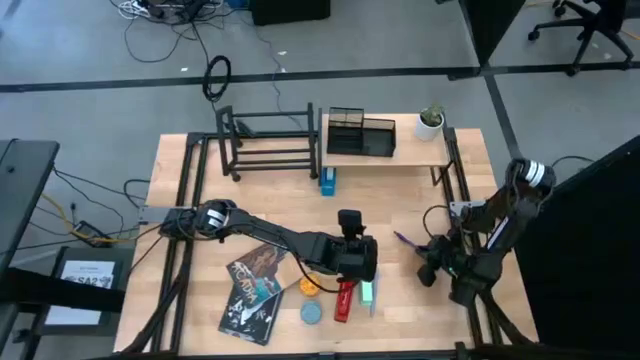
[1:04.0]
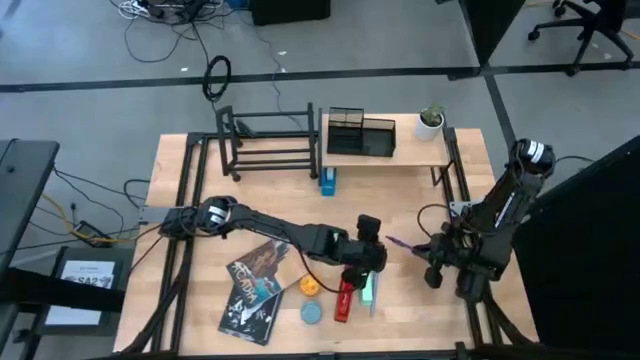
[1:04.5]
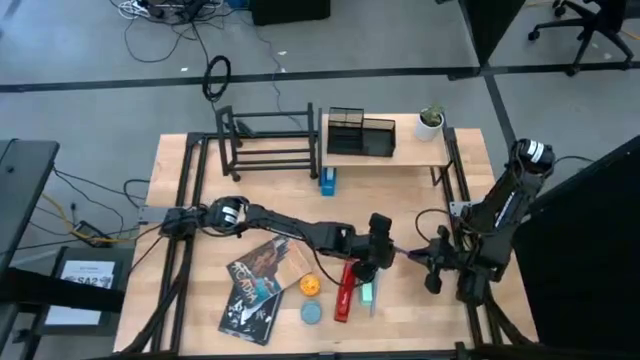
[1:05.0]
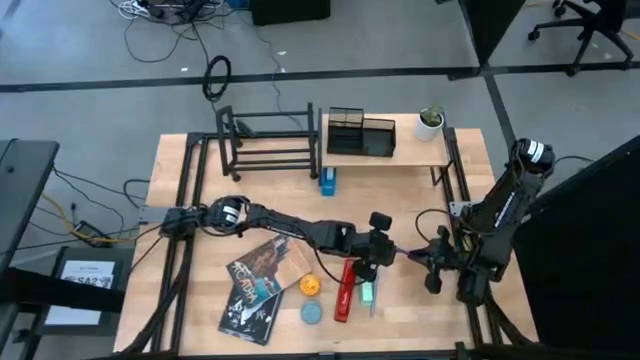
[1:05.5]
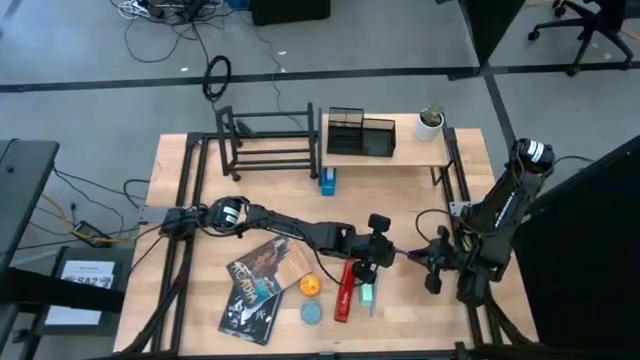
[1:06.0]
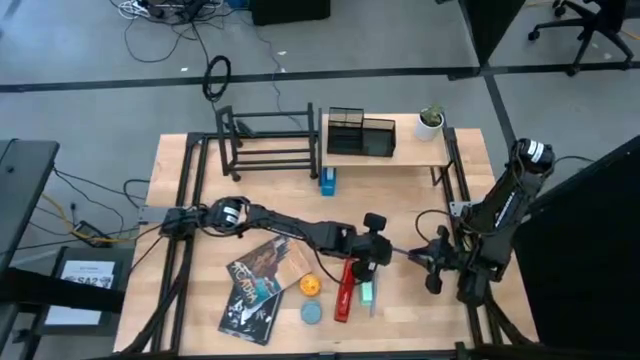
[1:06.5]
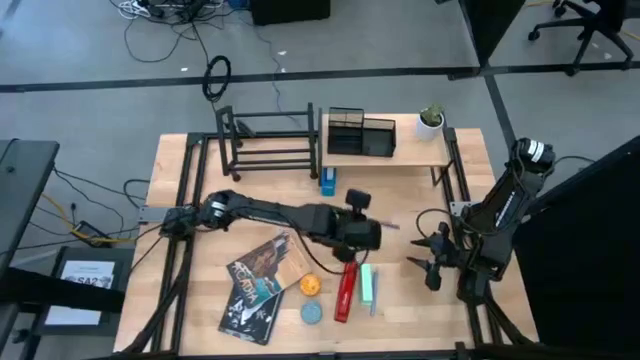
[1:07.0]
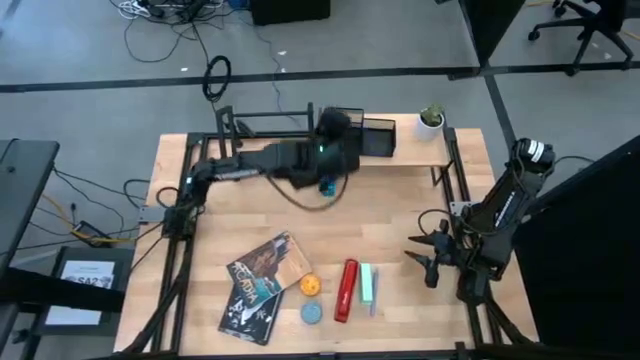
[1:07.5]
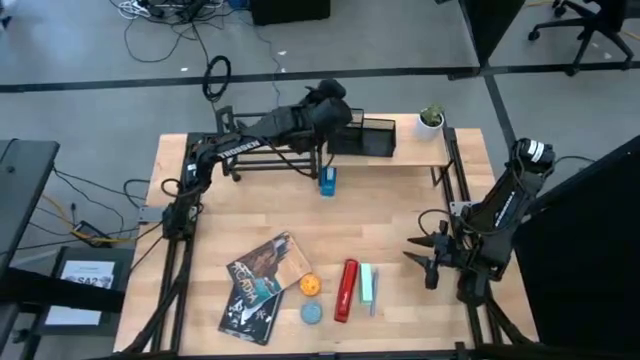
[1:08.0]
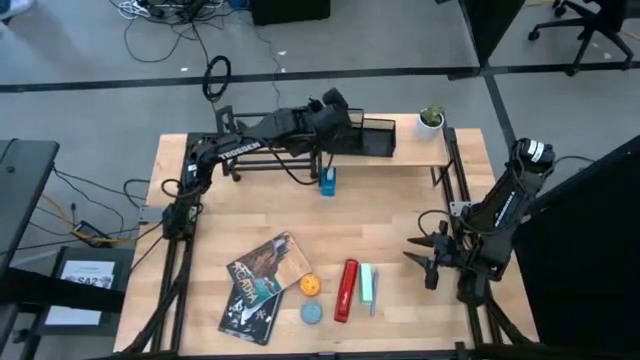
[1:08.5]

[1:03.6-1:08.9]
Task: Stock shelves
Put the blue ballpen on the pen holder

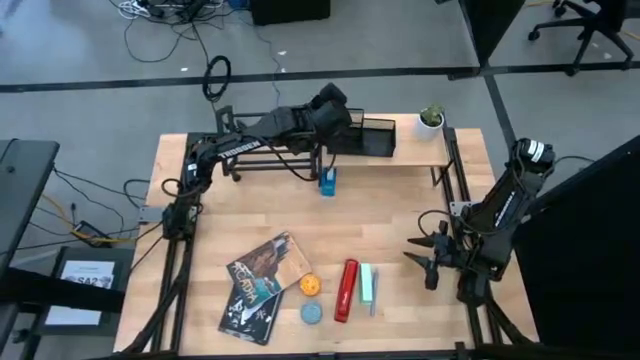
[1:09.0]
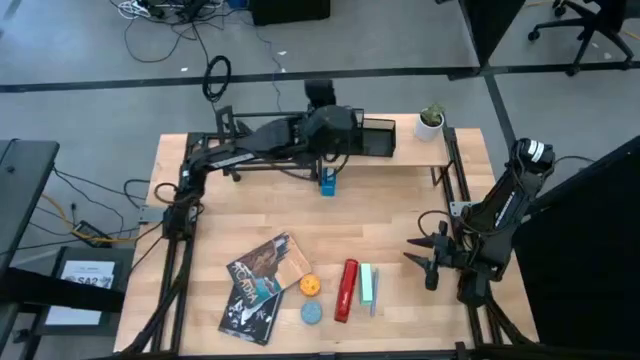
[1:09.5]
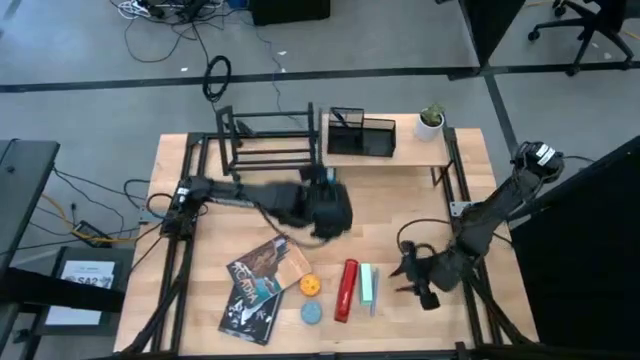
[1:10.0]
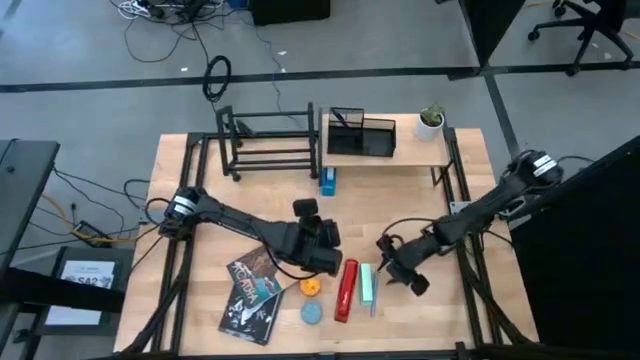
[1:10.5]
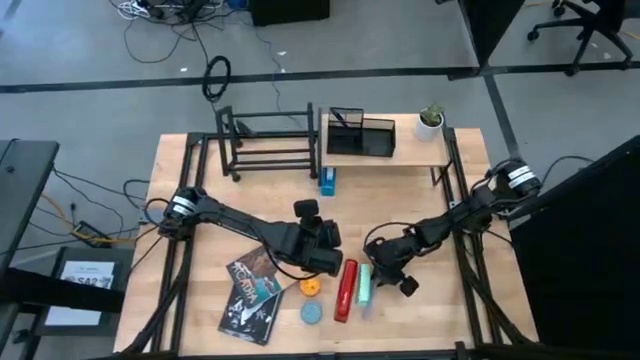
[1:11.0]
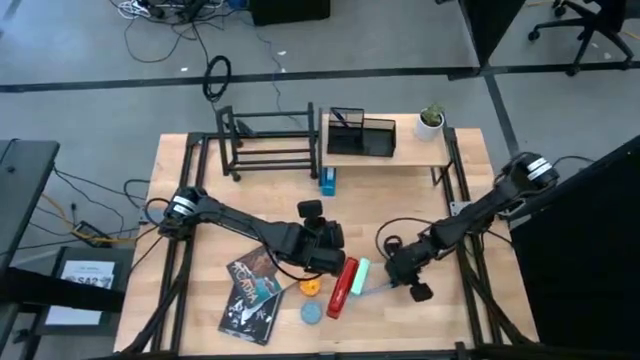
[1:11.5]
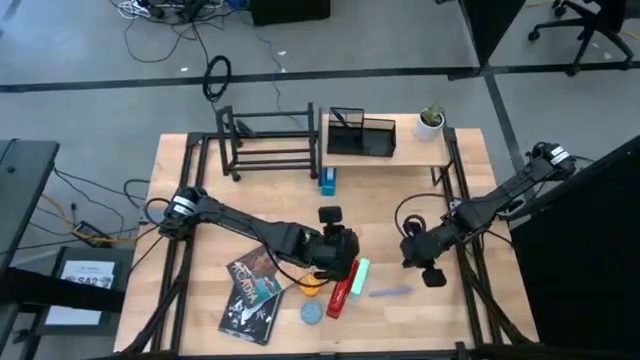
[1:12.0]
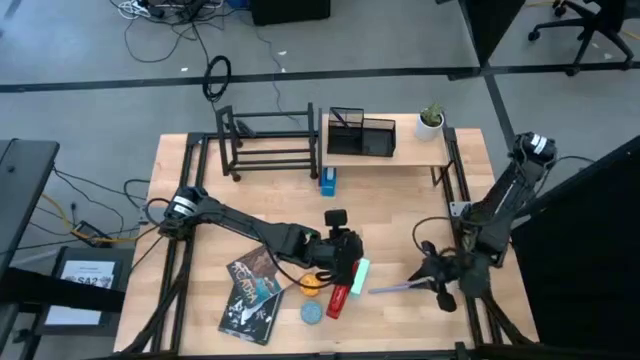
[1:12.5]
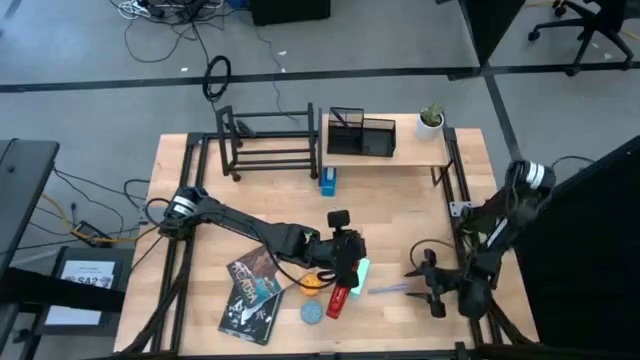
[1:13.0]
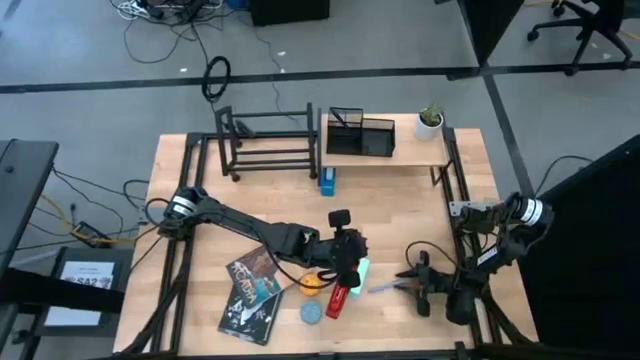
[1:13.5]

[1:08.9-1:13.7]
Put the purple ballpen on the pen holder

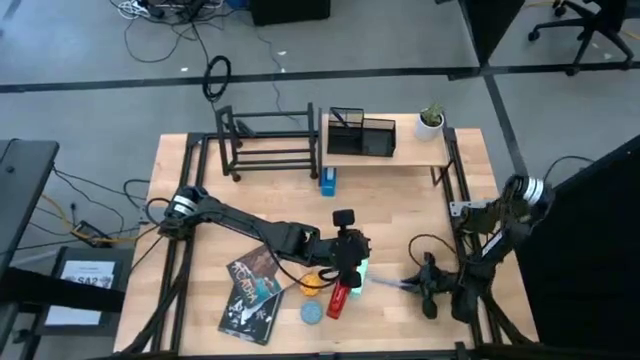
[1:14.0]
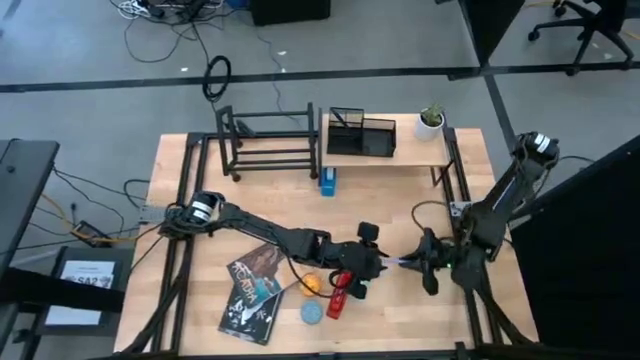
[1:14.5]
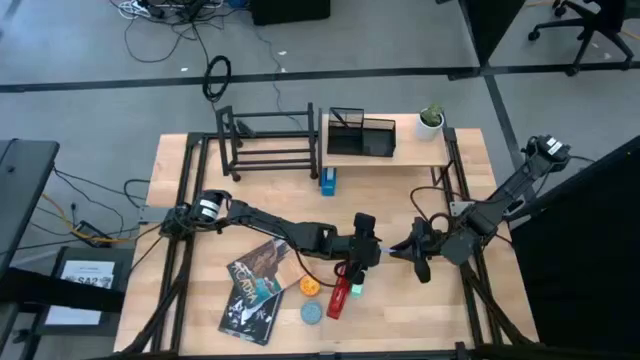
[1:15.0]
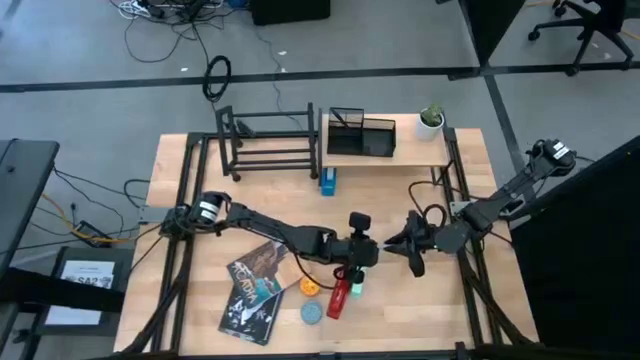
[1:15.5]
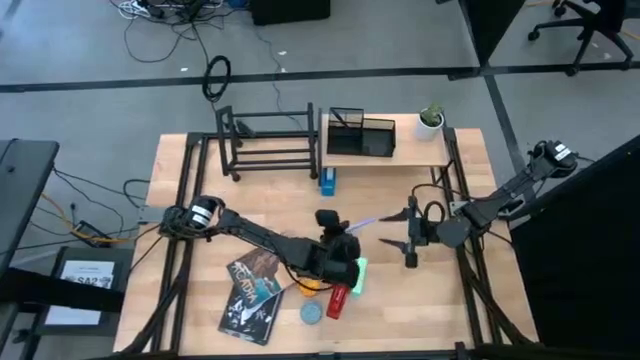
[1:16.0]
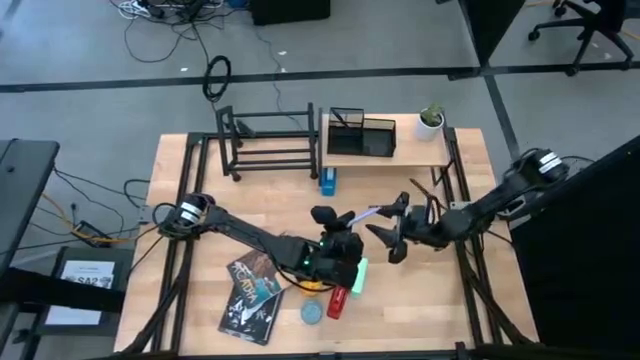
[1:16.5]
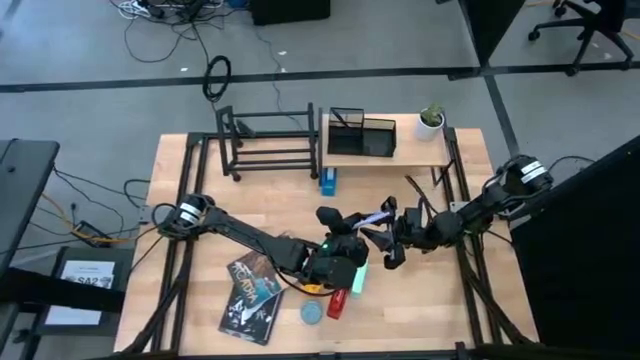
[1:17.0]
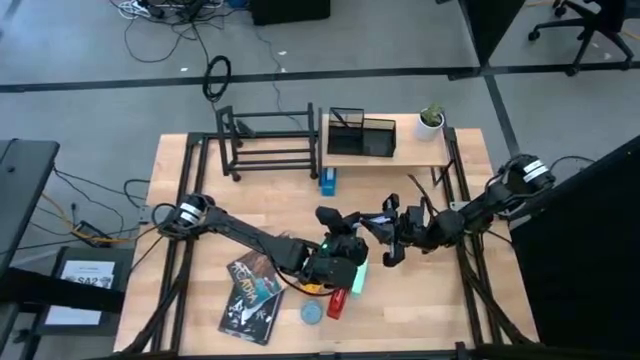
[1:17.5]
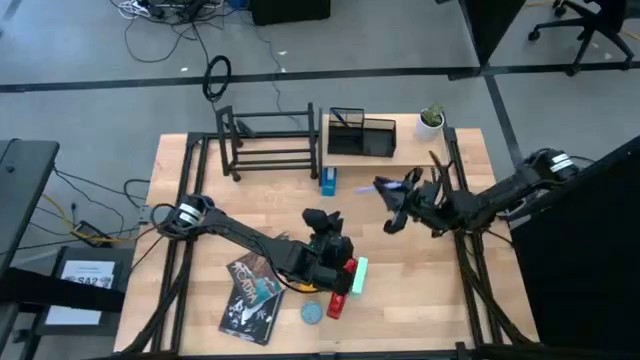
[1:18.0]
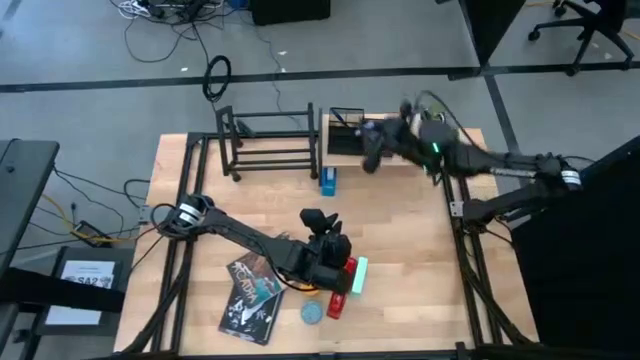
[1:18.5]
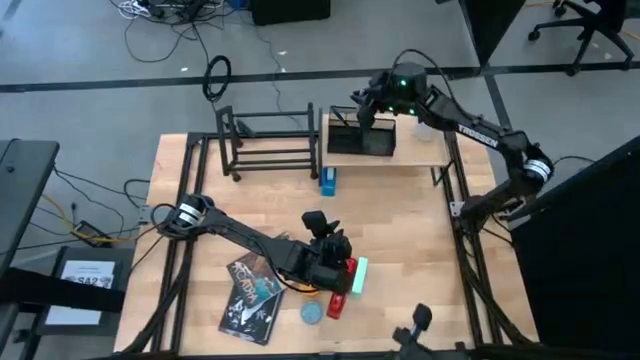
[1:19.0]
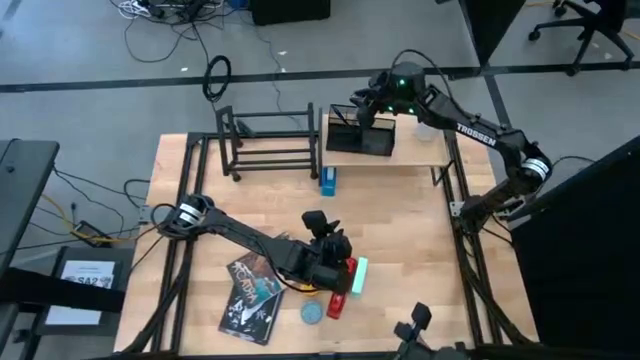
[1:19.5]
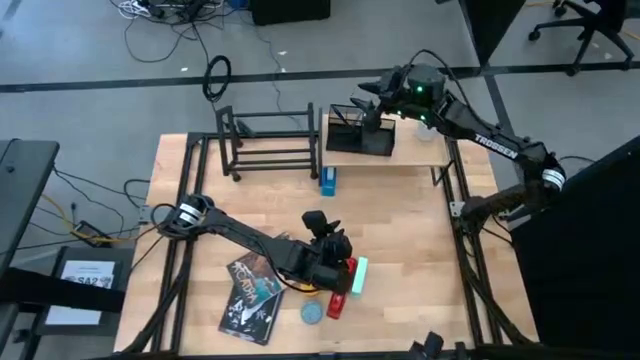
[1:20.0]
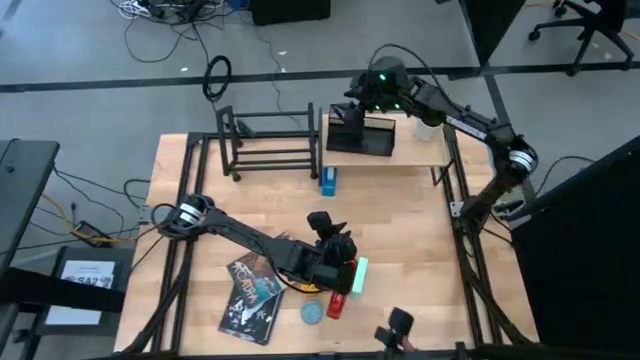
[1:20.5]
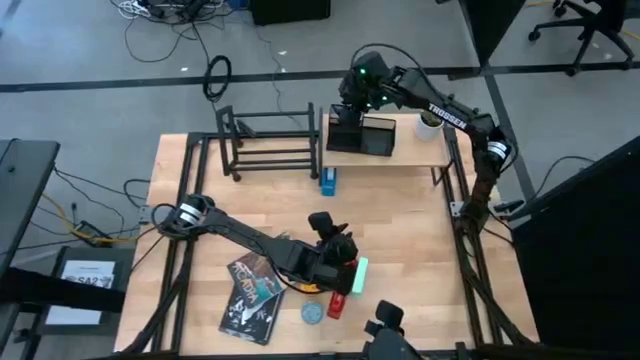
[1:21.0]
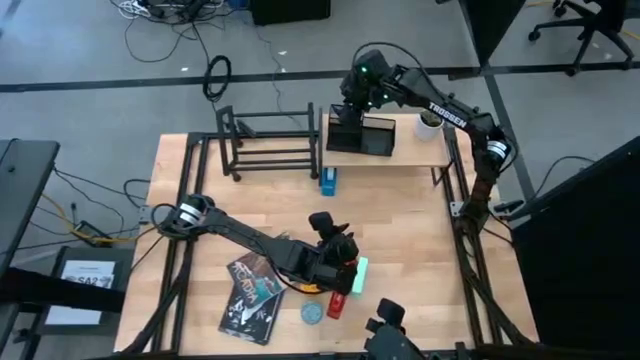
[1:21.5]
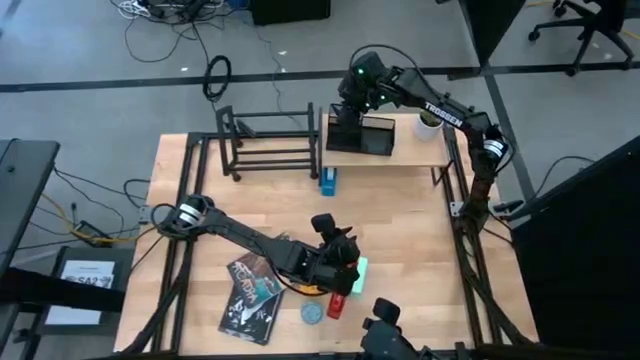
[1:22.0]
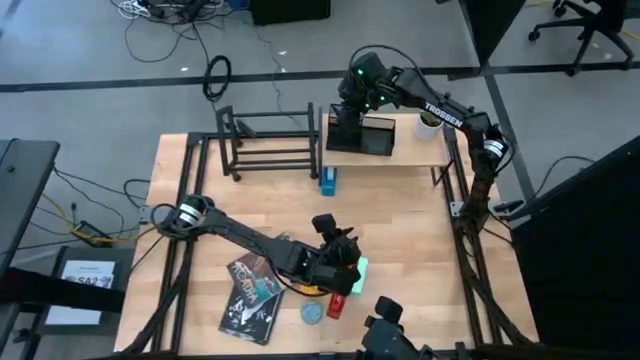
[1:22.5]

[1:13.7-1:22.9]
Put the purple ballpen on the pen holder

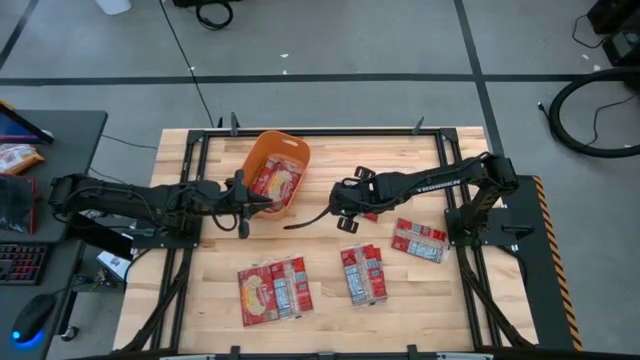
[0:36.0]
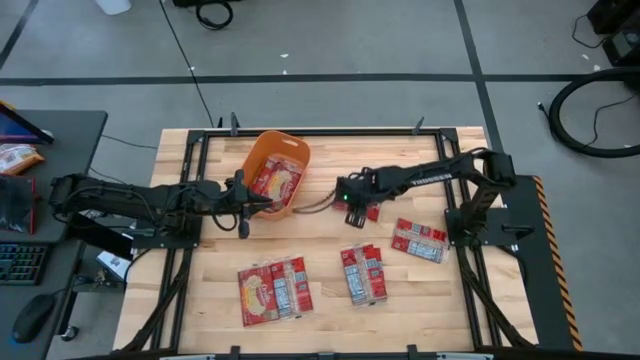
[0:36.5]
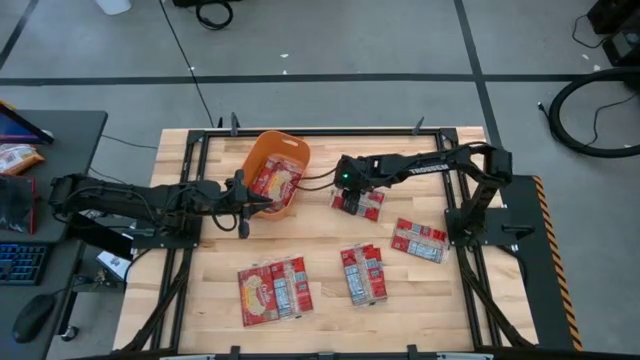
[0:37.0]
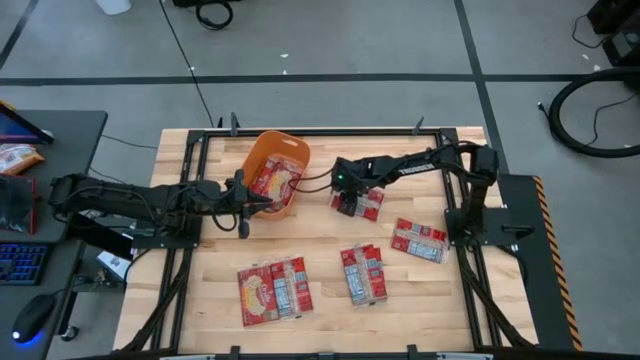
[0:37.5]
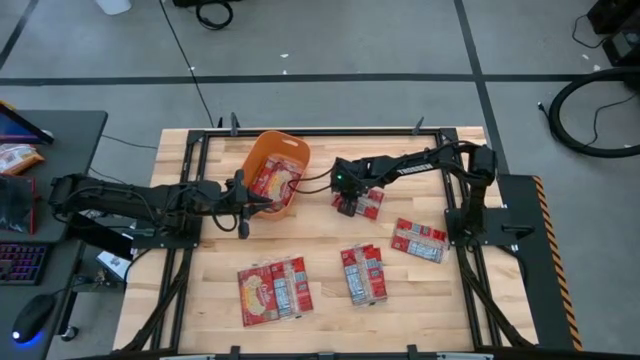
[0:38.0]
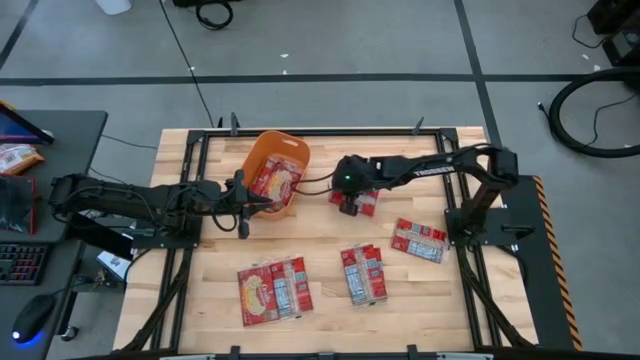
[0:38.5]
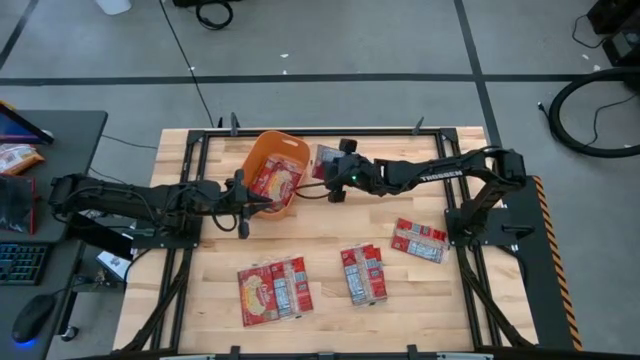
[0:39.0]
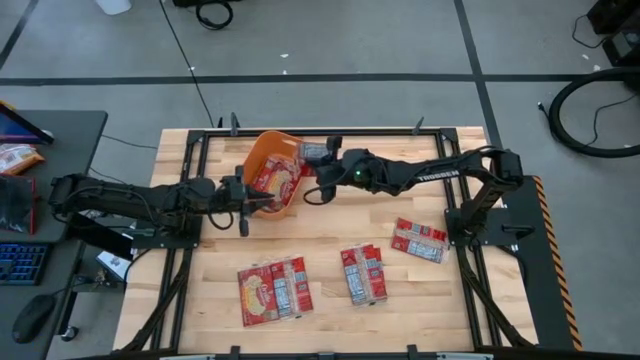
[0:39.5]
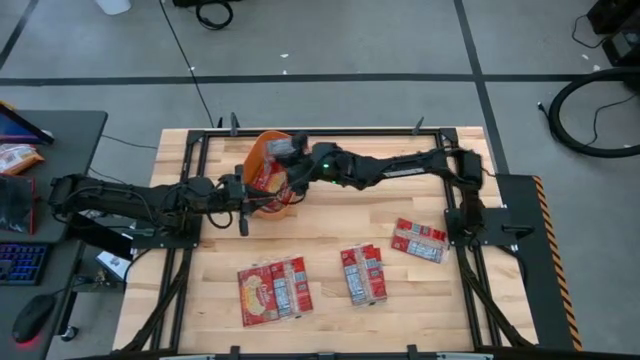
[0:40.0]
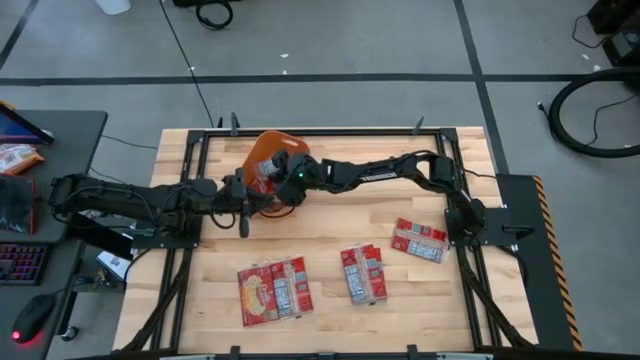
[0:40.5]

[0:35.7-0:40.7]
Task: Sort popcorn bags into baskets
Stack the popcorn pack on top of the other popcorn into the orange bin
